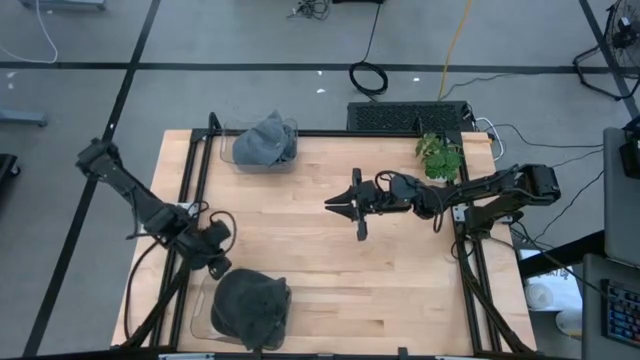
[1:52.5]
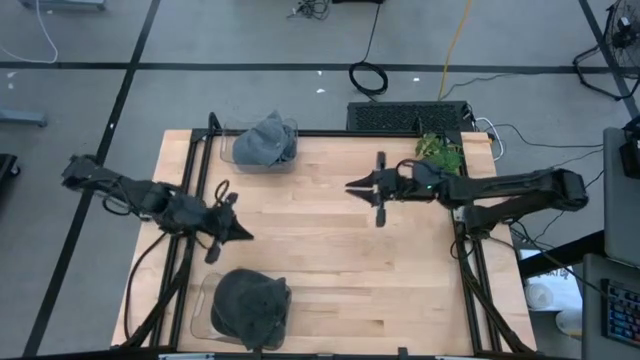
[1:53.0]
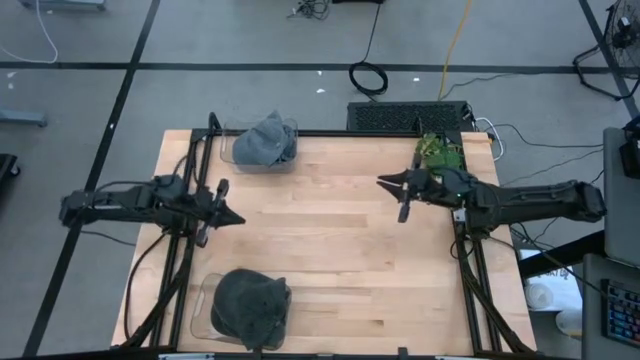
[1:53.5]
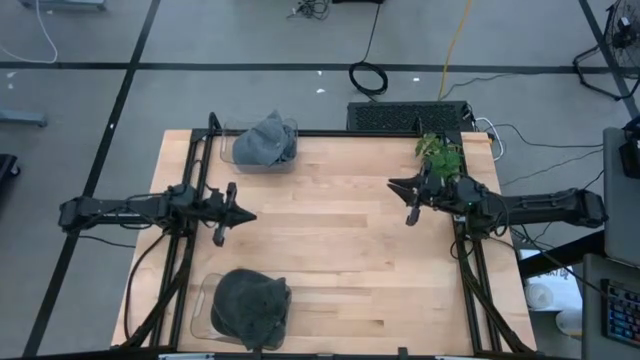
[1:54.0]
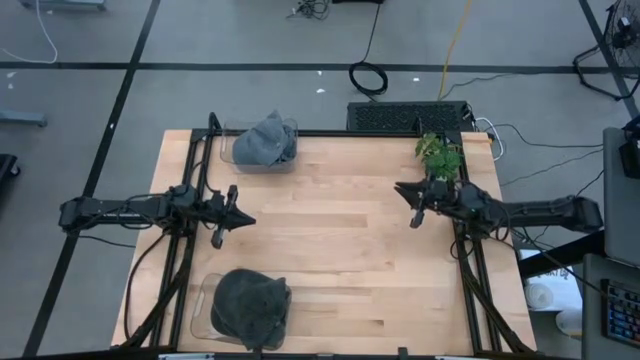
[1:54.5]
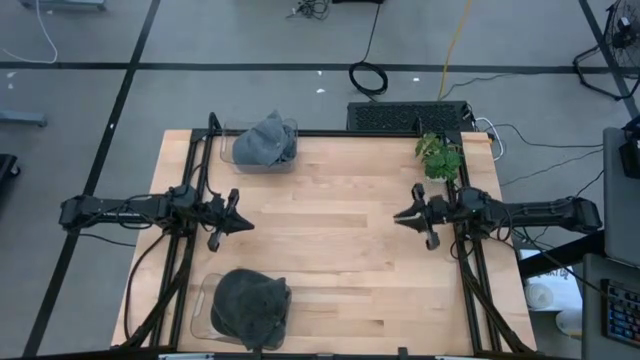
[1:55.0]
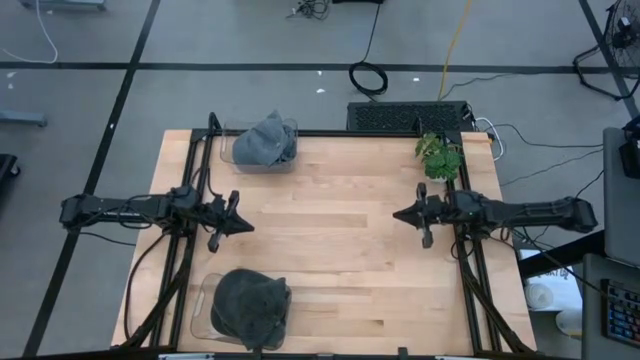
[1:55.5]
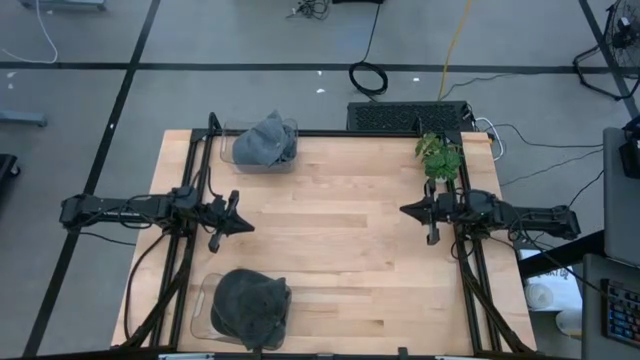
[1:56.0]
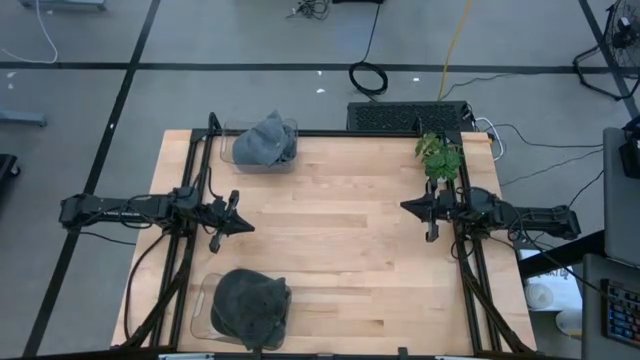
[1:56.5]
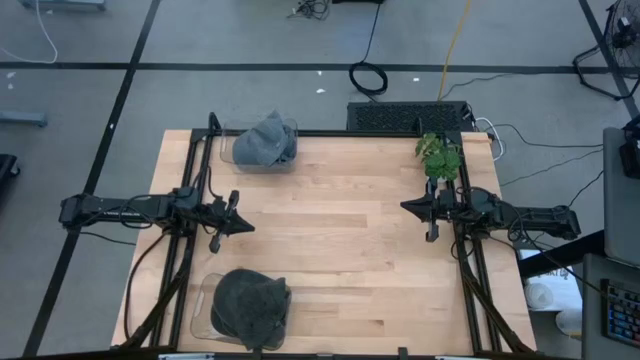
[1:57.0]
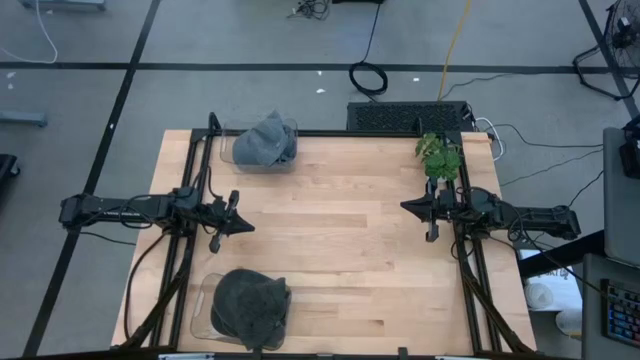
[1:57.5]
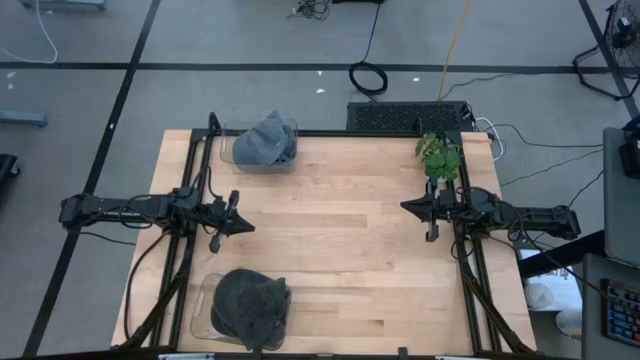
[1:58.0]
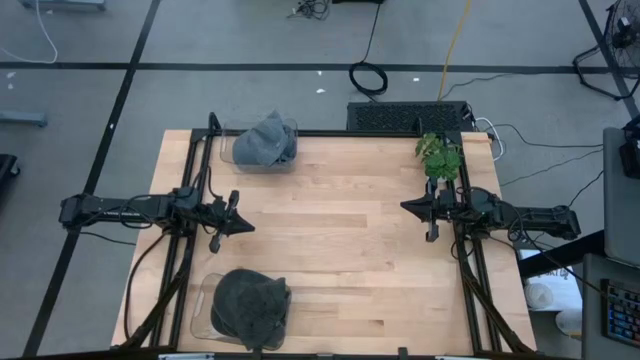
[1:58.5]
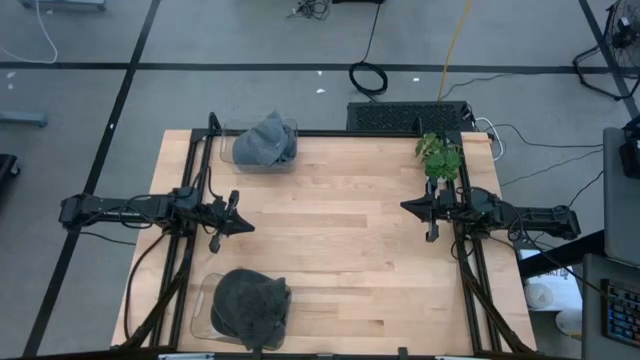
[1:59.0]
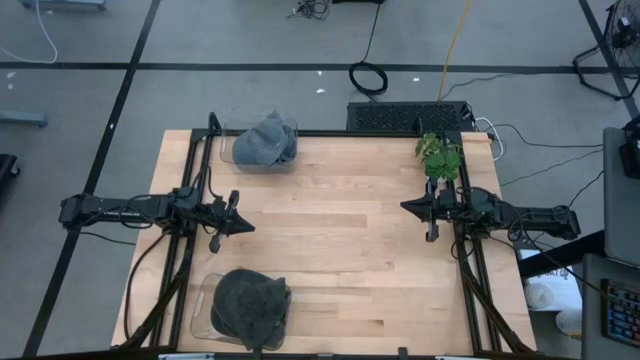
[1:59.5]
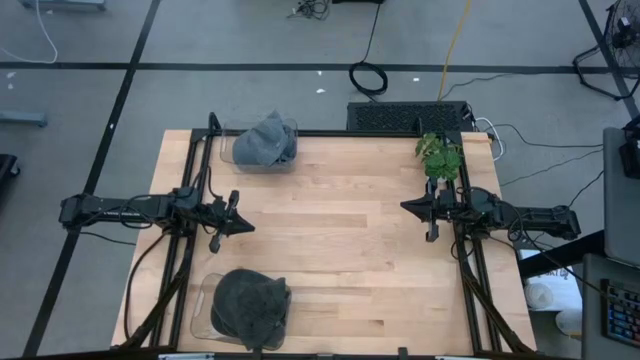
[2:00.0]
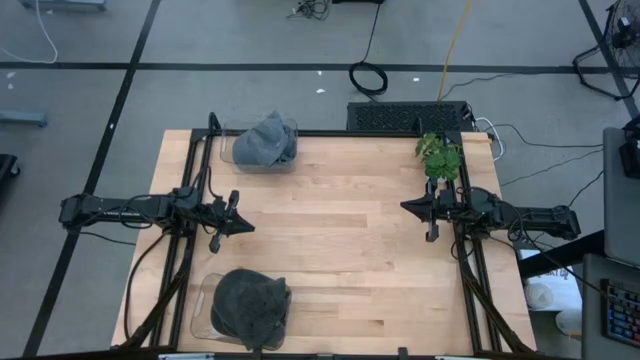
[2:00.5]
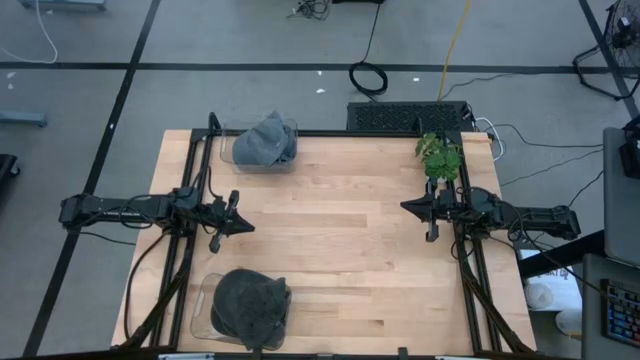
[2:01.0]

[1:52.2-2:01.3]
Task: Pick & Place hat
Return to Home Position

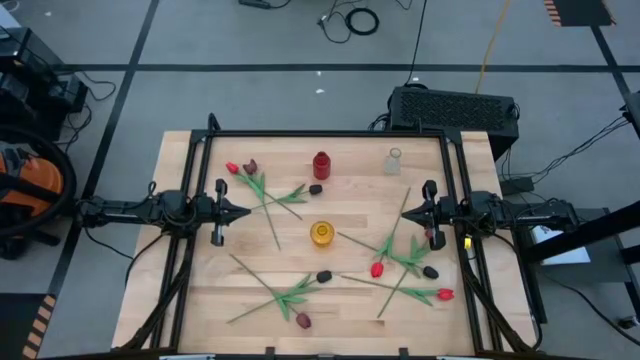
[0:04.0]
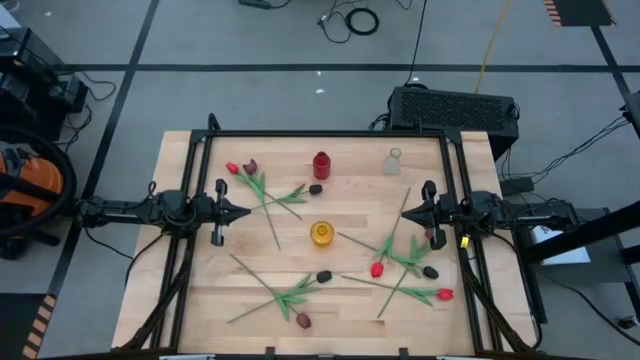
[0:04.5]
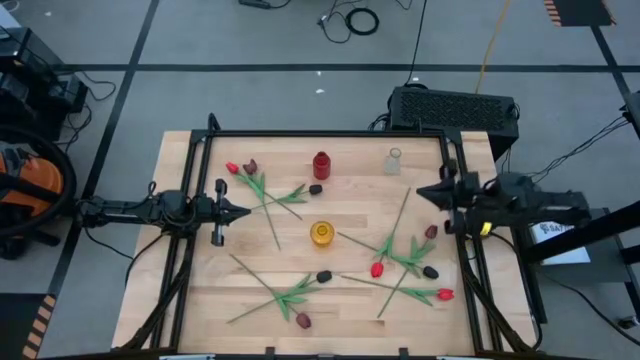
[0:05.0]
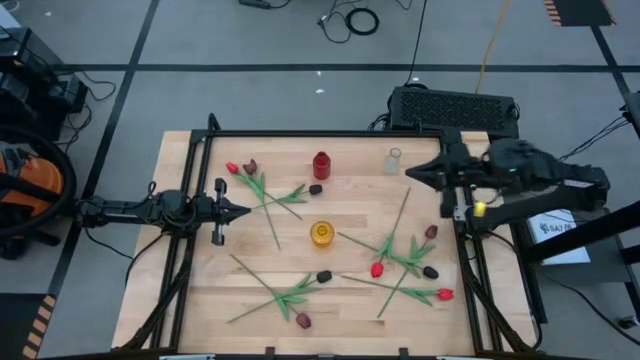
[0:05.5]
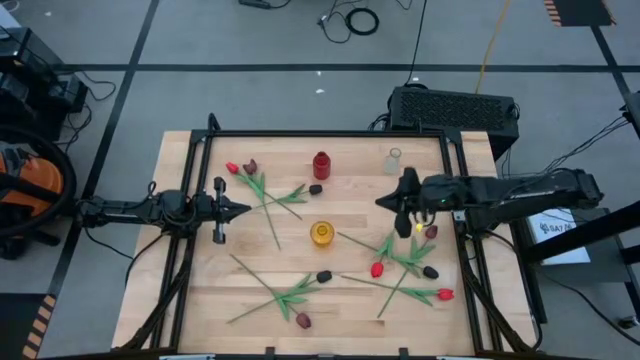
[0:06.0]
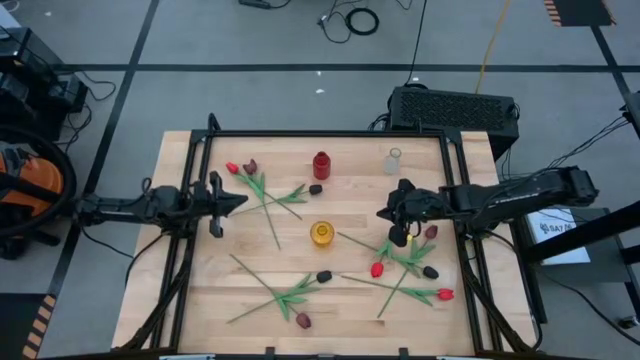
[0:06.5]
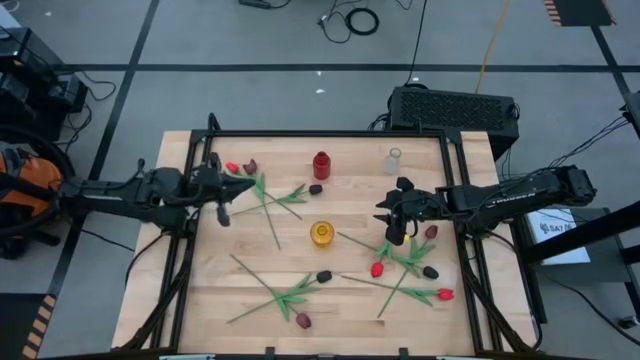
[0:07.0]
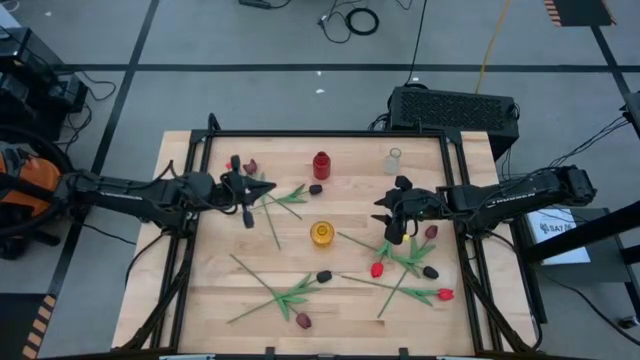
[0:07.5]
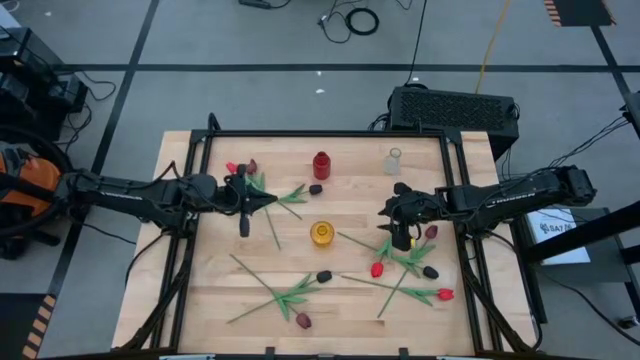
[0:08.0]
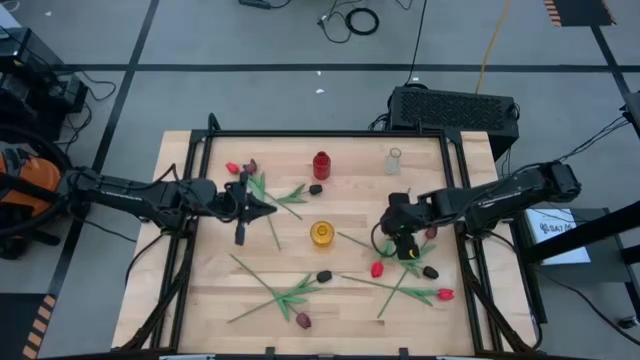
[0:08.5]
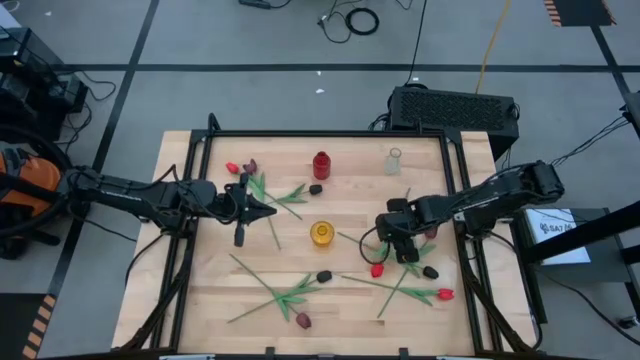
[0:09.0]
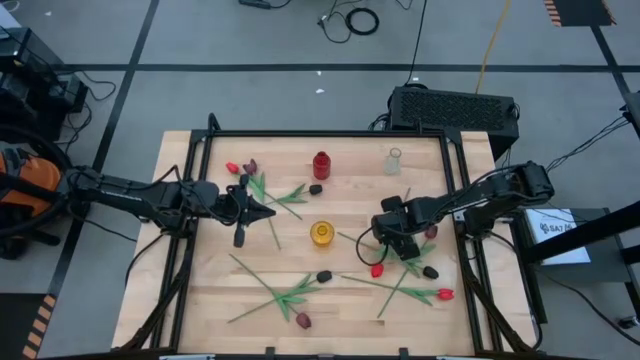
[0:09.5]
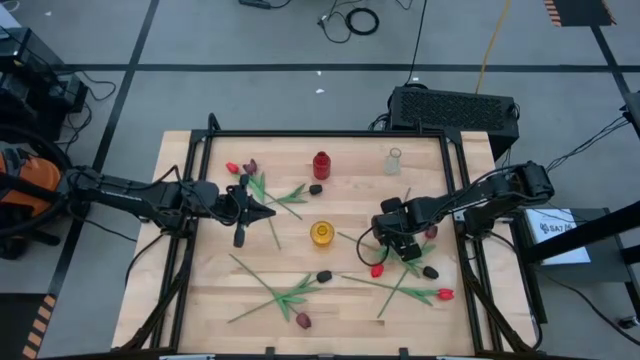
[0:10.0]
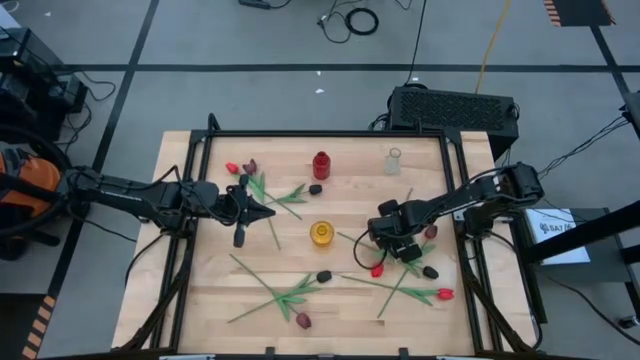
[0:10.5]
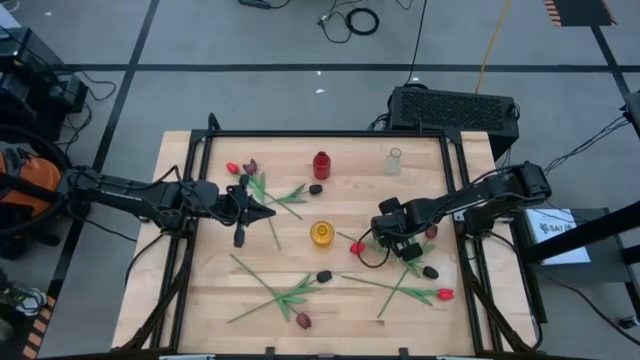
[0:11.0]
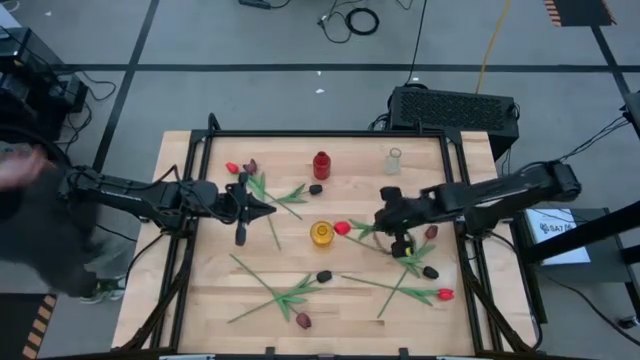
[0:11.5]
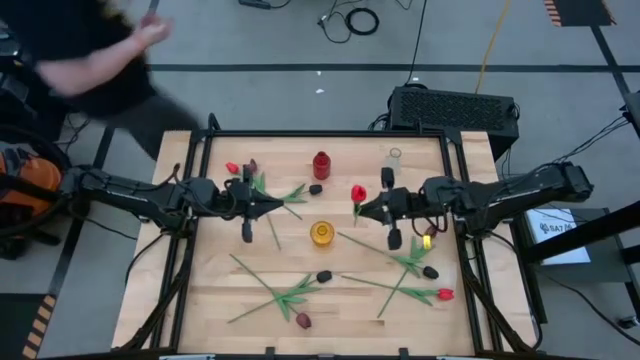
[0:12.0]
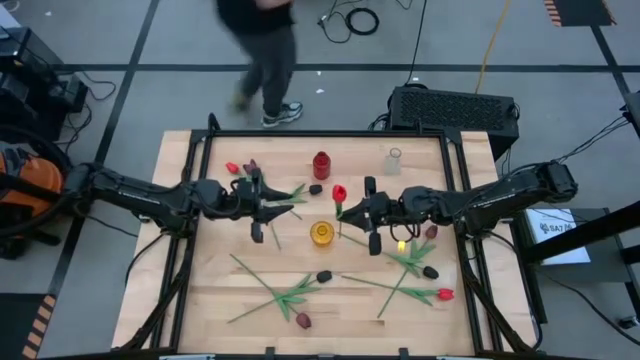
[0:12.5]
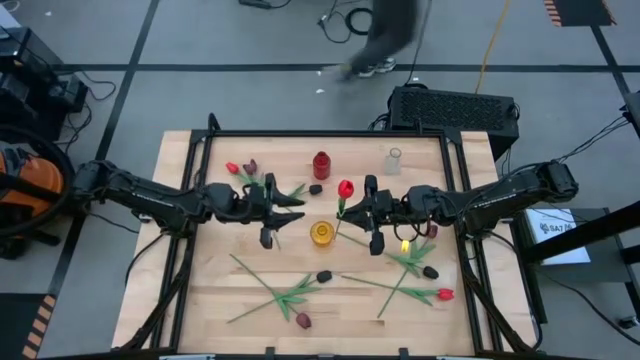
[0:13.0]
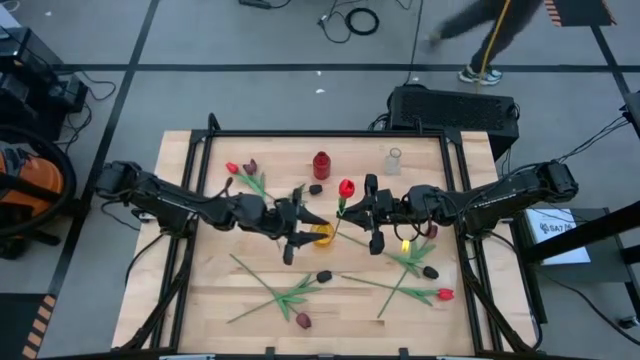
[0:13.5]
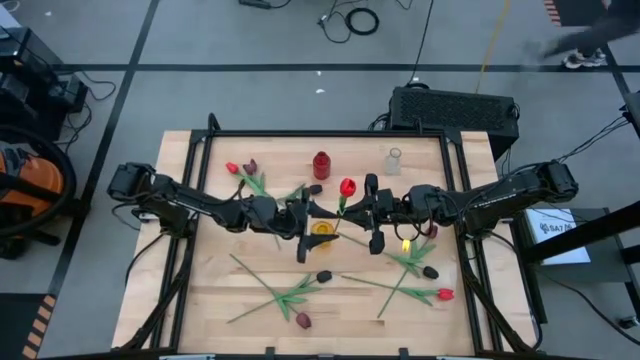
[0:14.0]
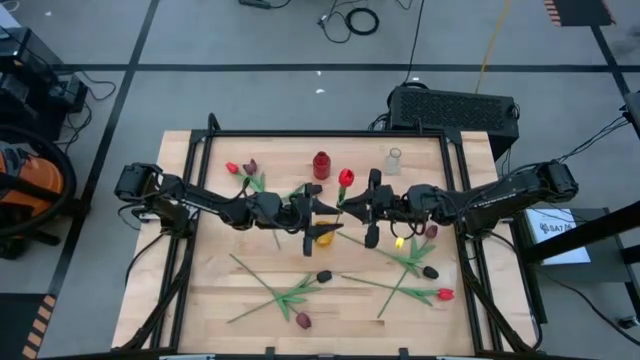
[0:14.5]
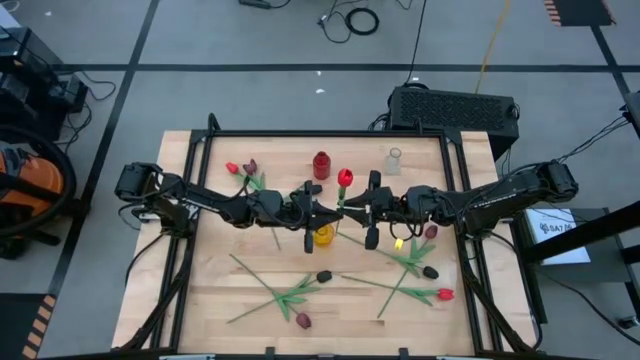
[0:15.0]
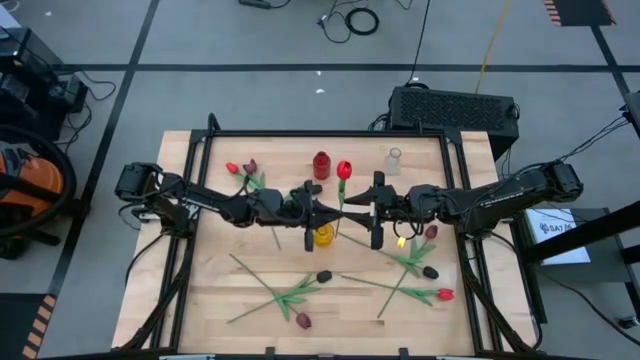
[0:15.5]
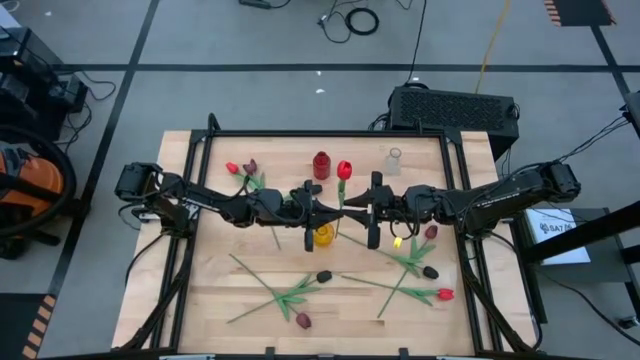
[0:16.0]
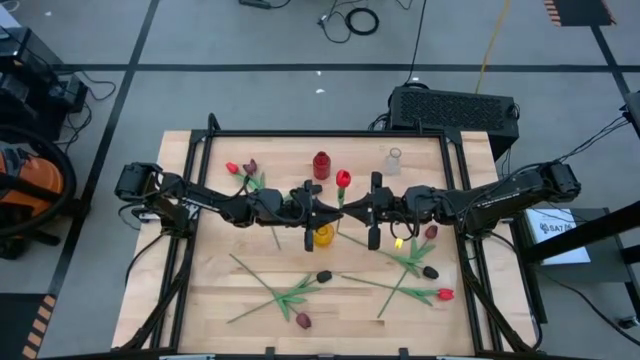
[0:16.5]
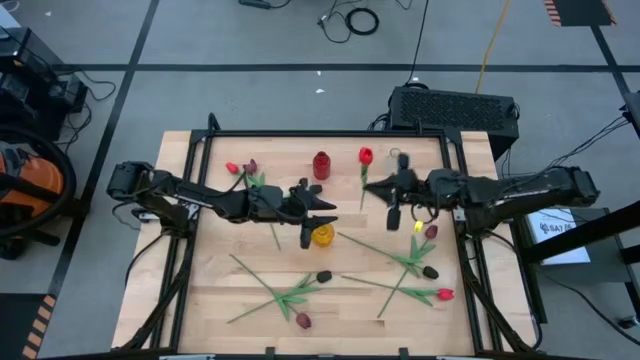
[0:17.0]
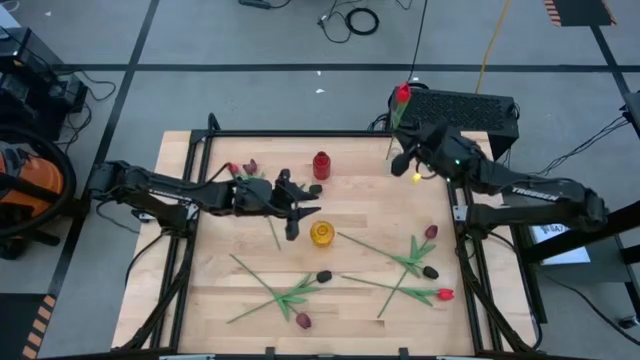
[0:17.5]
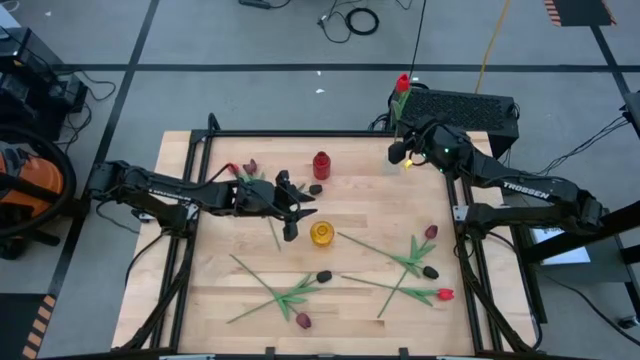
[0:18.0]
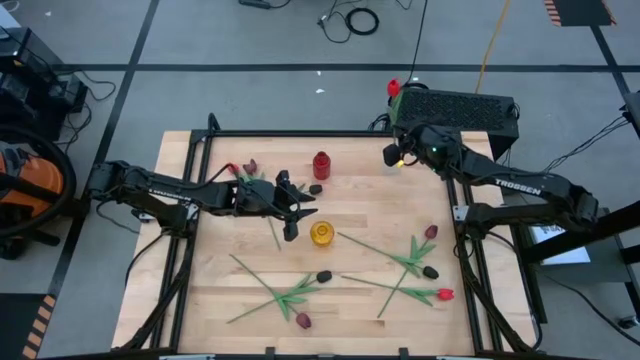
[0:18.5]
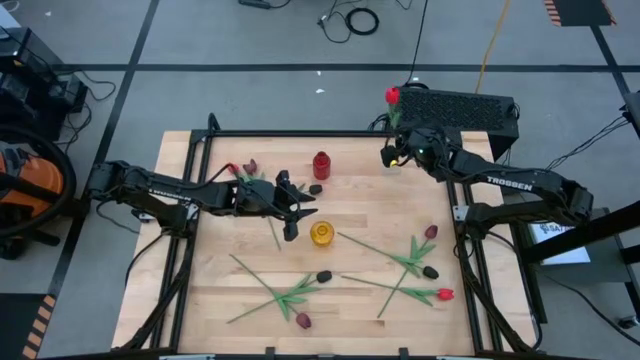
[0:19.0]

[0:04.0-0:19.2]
Task: Sort flowers into vase by color
Put the middle right red flower into the transparent vase
